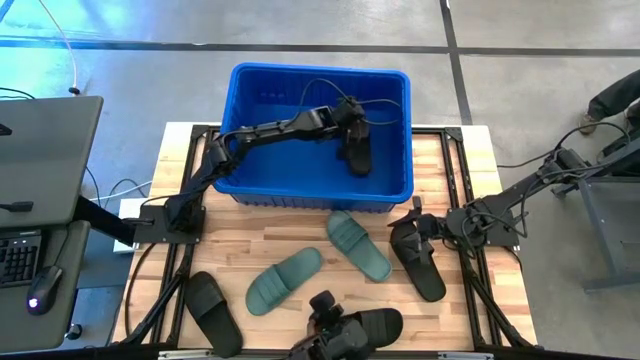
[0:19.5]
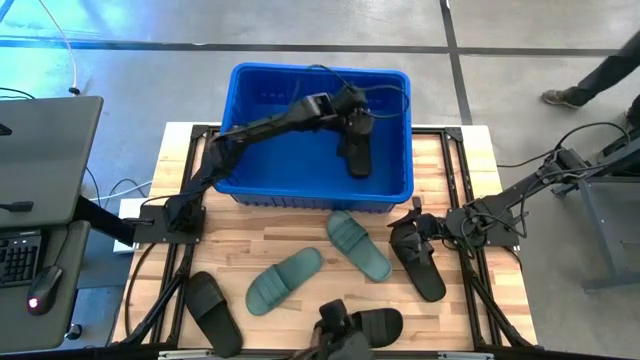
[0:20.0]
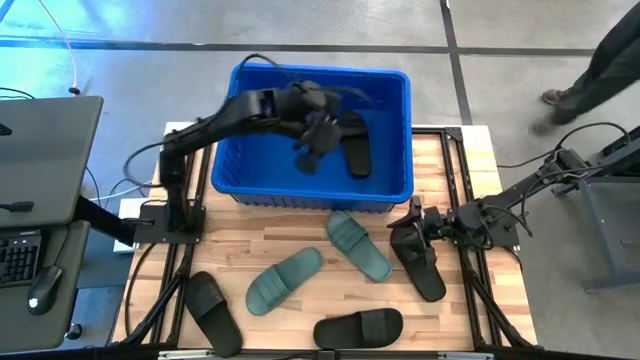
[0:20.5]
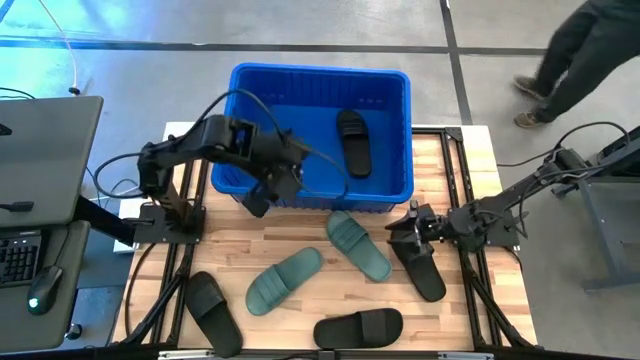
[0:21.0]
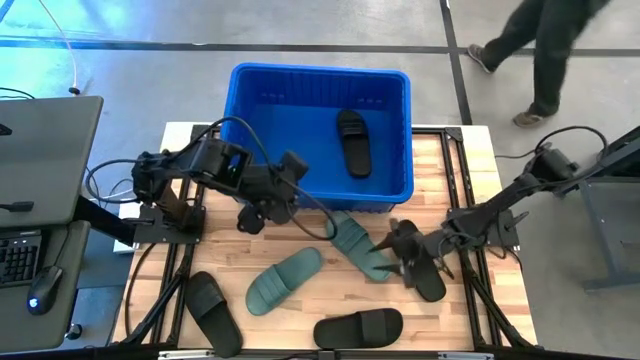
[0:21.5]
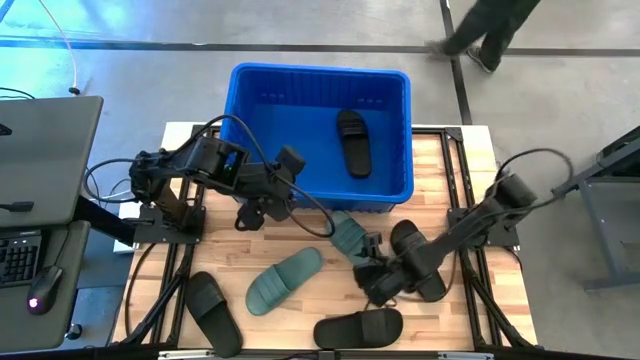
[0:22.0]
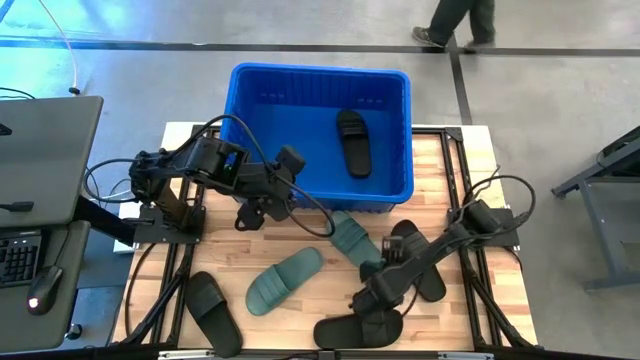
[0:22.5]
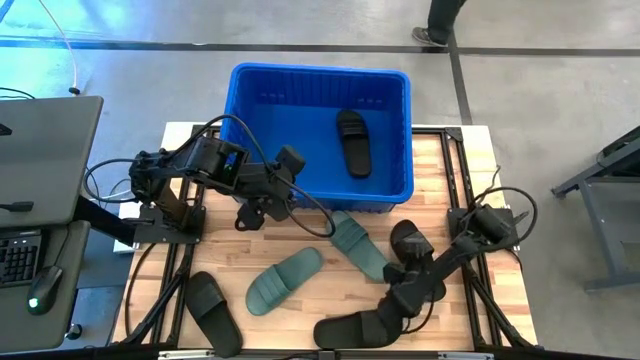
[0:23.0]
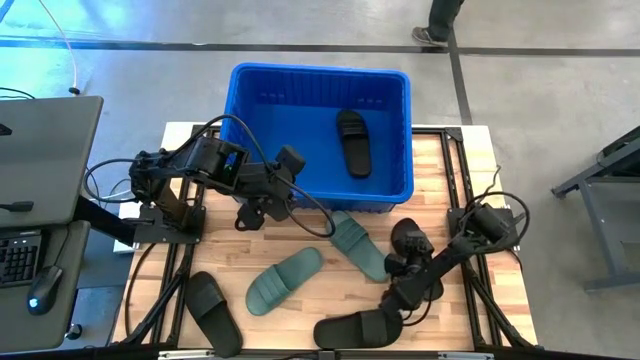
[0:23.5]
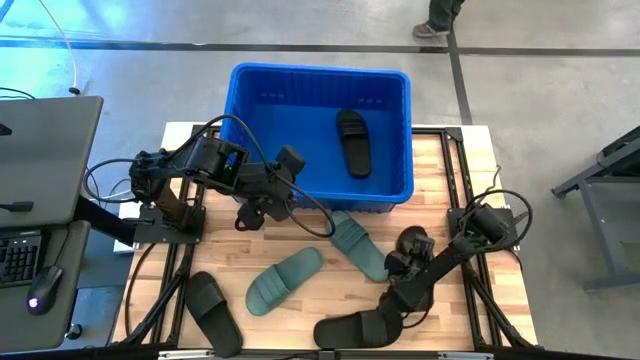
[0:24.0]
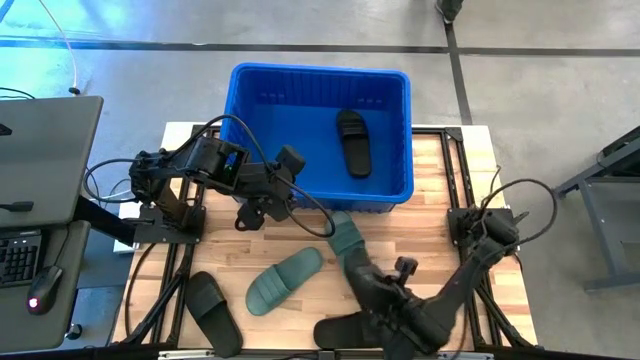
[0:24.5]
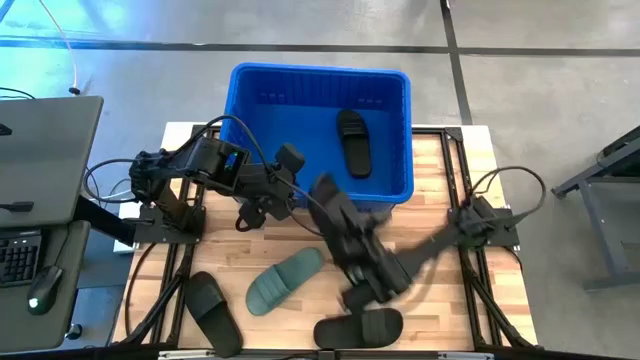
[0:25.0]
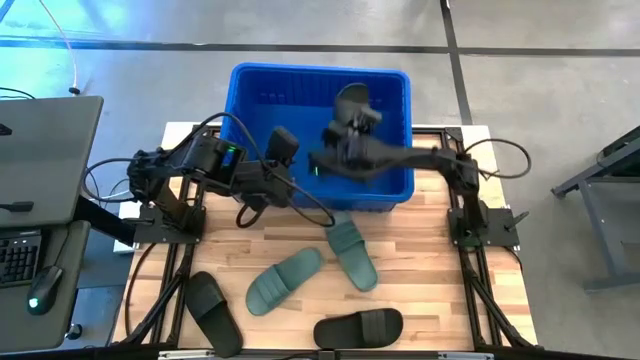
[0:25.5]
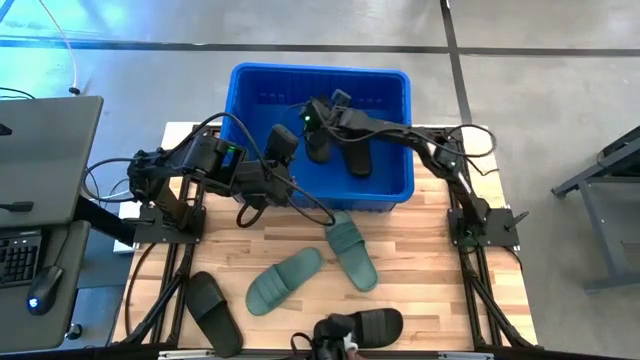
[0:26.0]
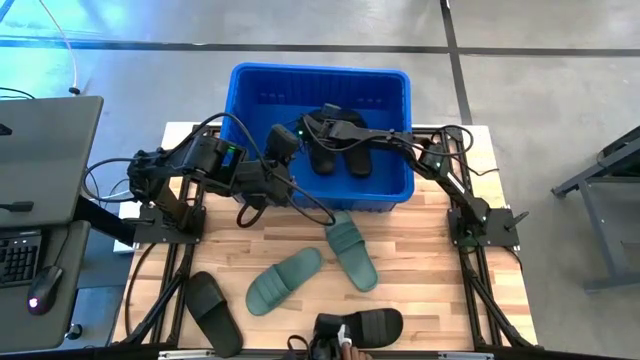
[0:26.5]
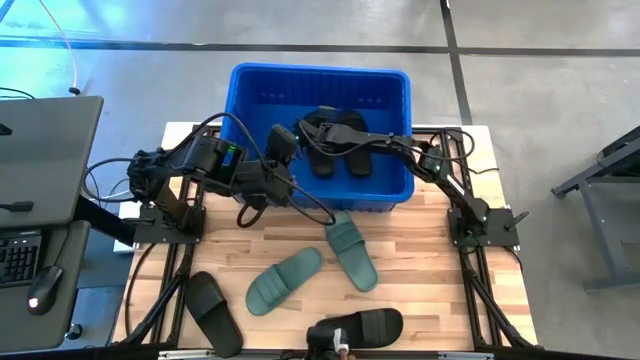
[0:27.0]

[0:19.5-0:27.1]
Task: Pick and place slides into bin
Put the black slide into the blue container

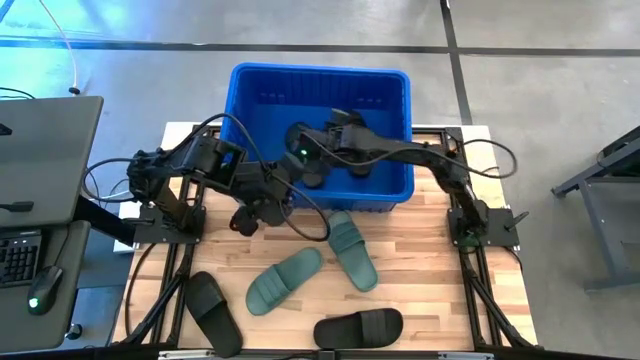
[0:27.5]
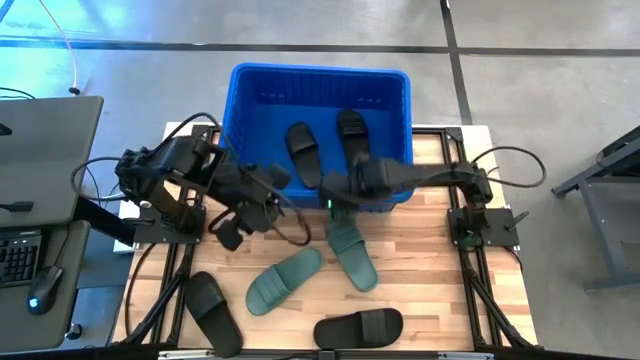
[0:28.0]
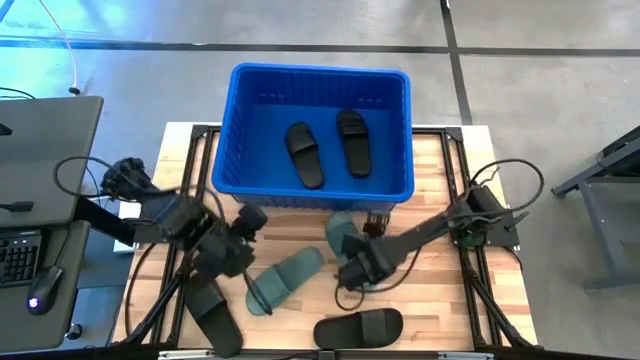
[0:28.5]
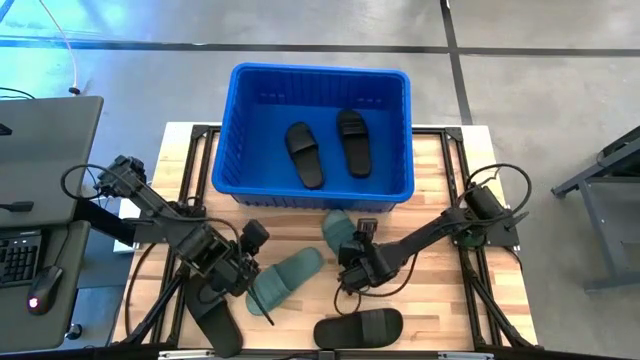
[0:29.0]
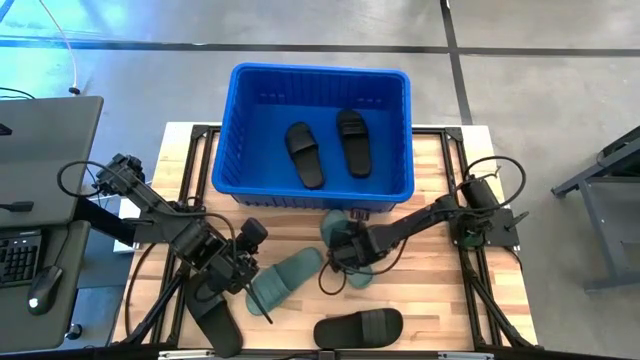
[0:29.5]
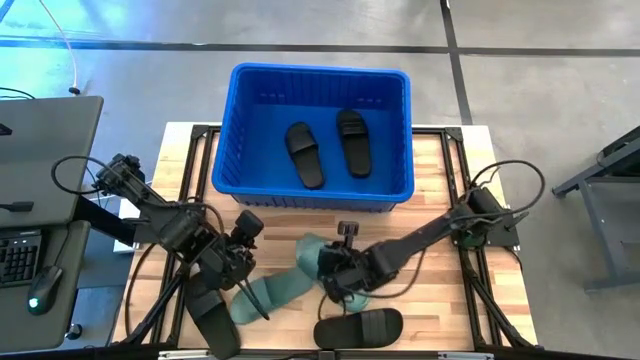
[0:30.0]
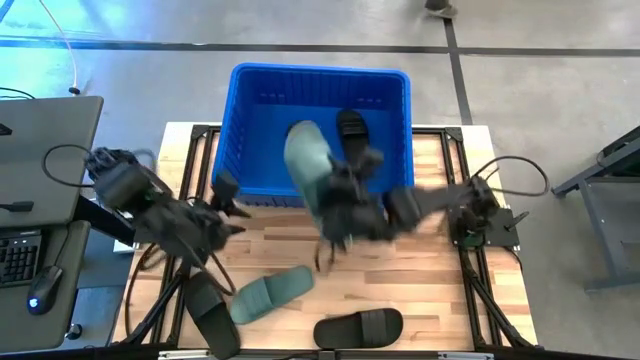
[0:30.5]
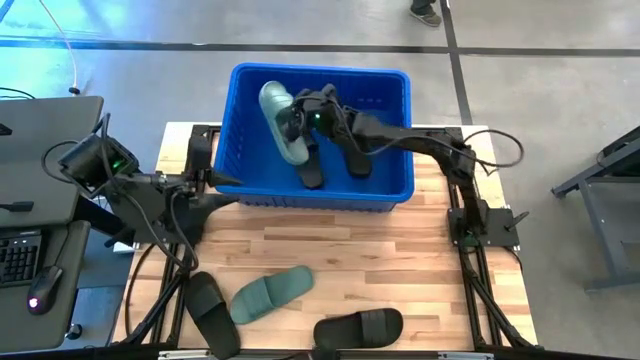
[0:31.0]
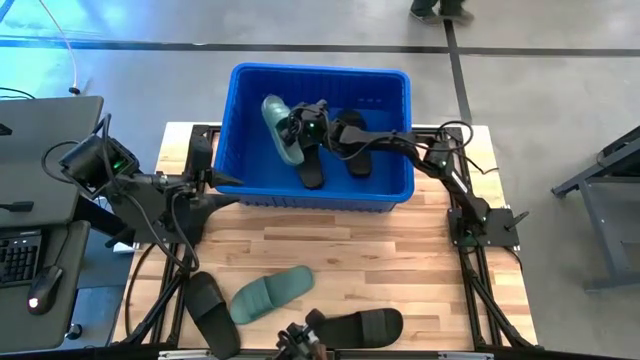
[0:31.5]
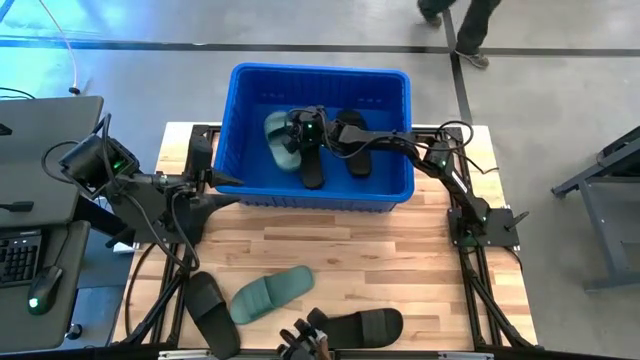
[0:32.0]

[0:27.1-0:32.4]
Put the green slide into the blue container

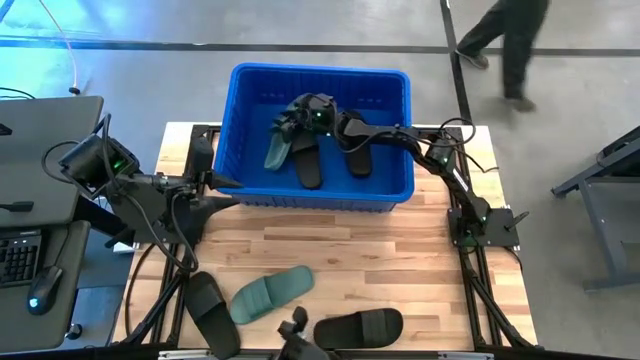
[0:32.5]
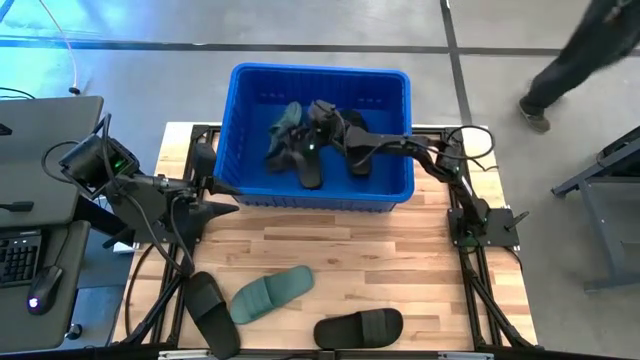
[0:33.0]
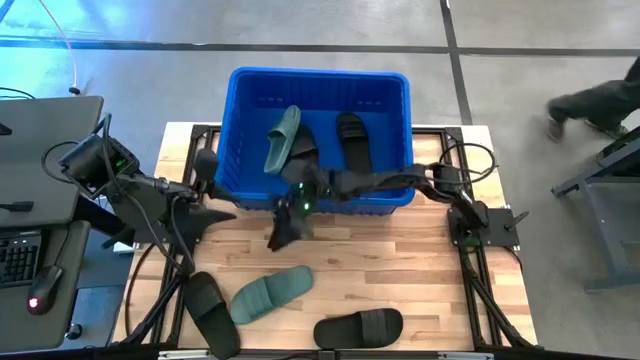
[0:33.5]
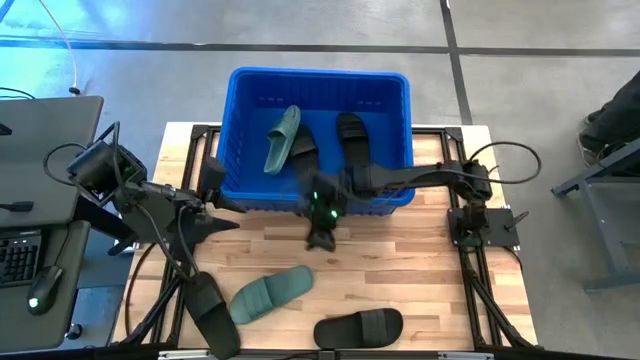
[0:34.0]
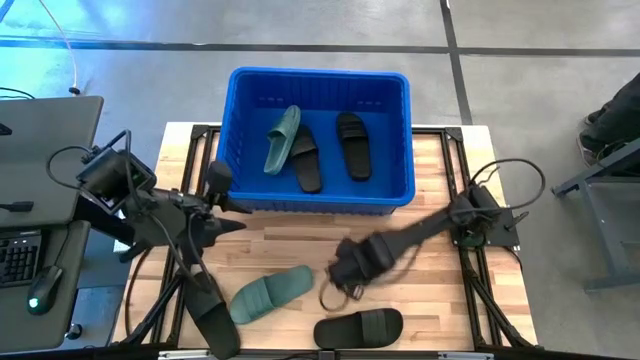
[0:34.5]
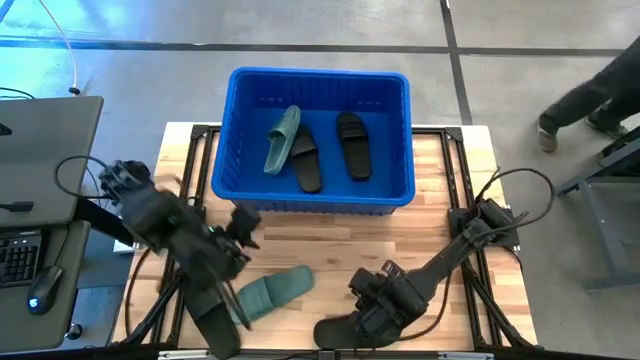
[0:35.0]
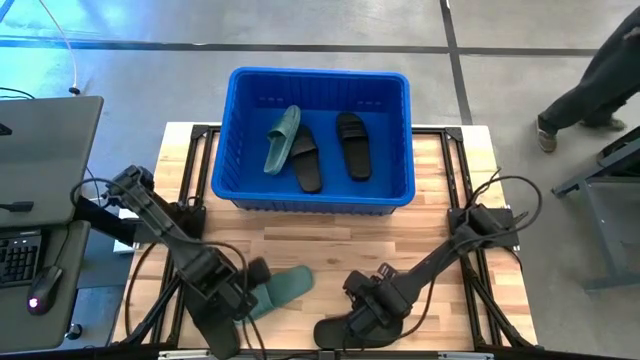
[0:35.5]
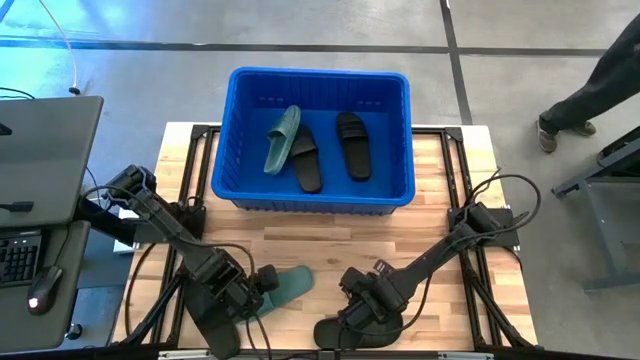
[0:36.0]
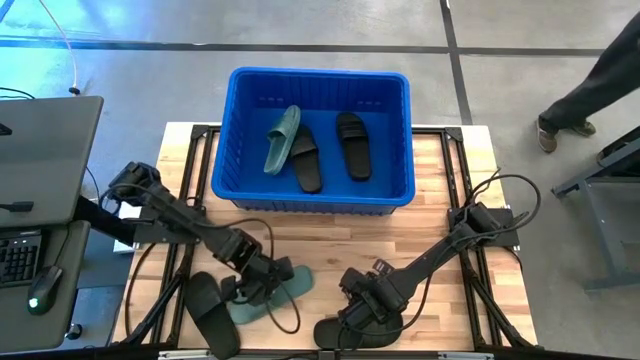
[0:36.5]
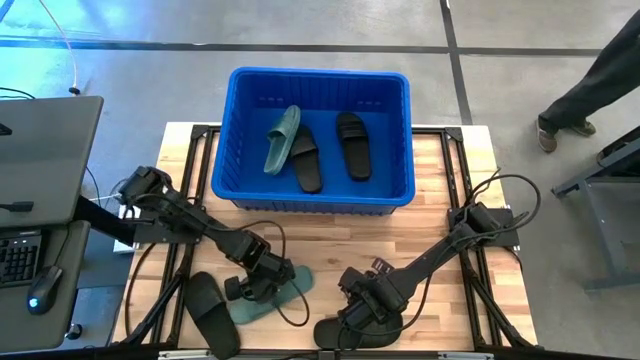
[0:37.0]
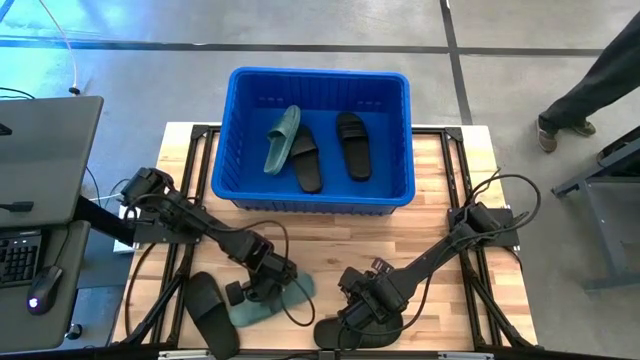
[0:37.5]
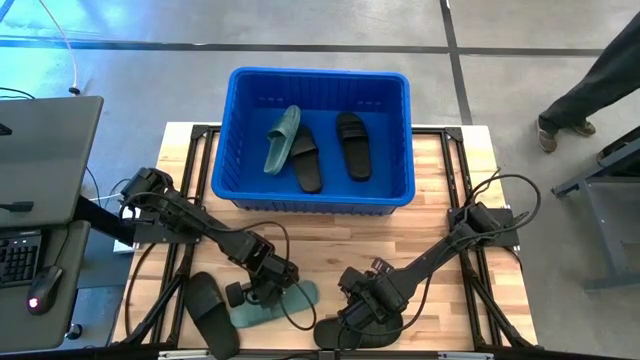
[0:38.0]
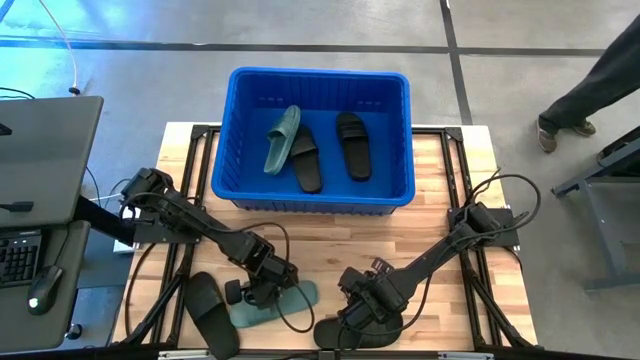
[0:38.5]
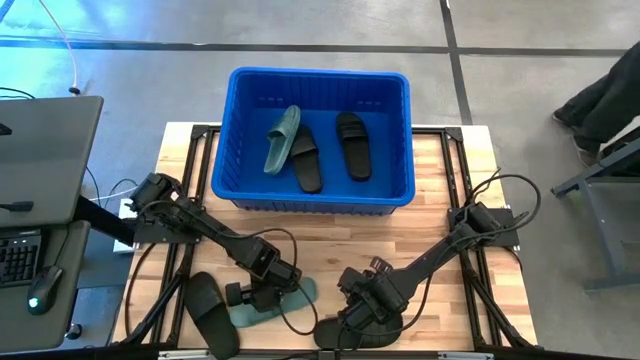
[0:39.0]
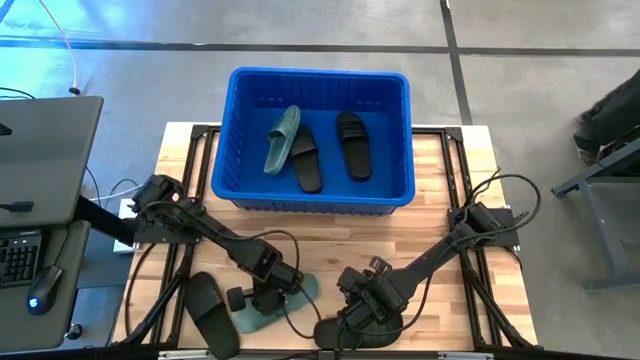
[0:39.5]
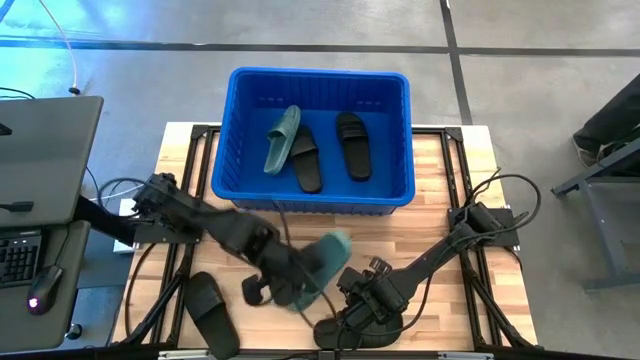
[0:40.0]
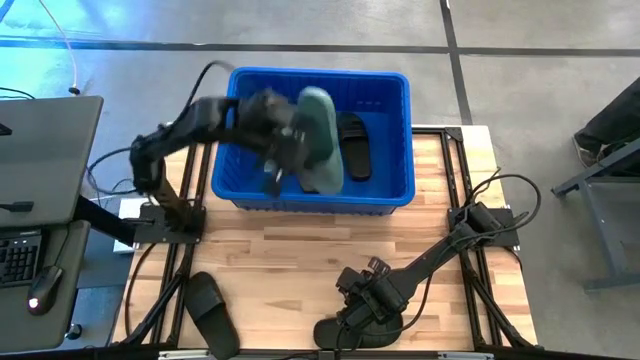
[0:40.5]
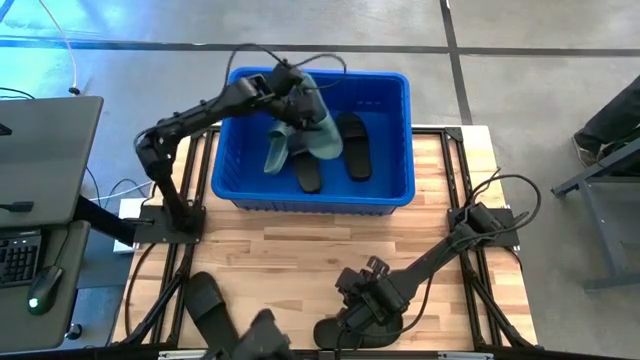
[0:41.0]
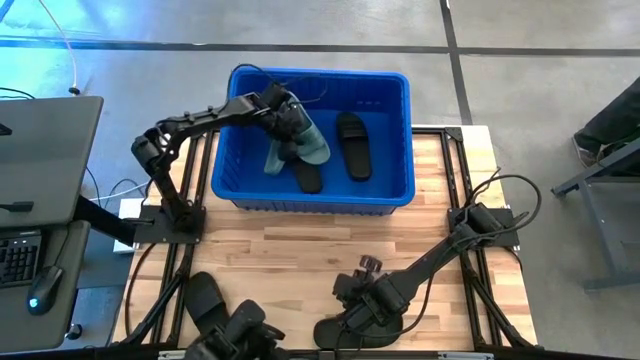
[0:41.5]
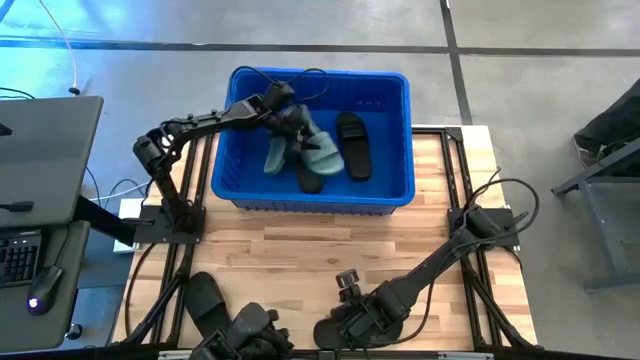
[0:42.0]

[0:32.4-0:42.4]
Put the green slide into the blue container
